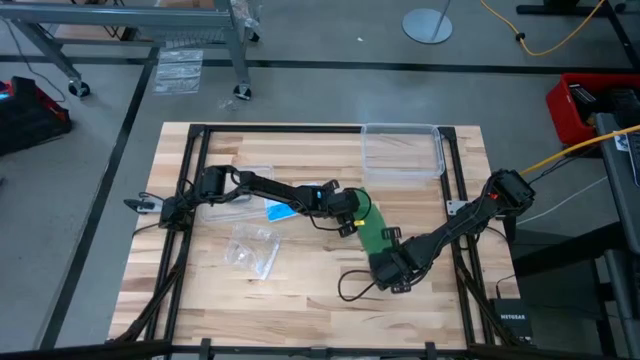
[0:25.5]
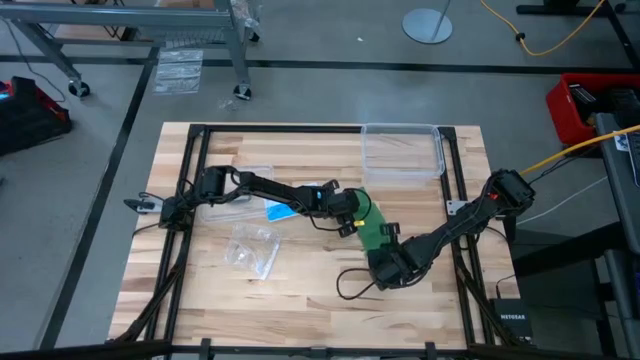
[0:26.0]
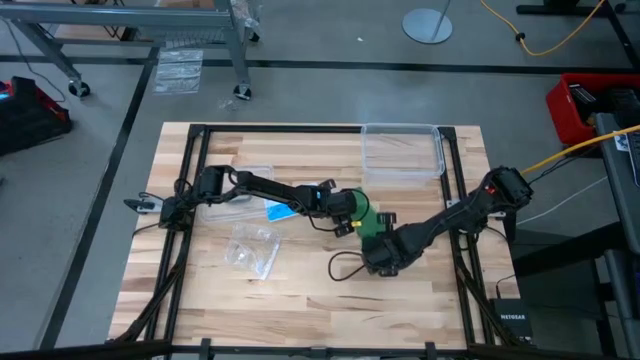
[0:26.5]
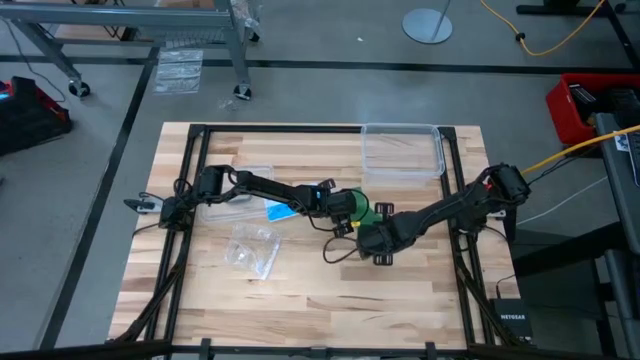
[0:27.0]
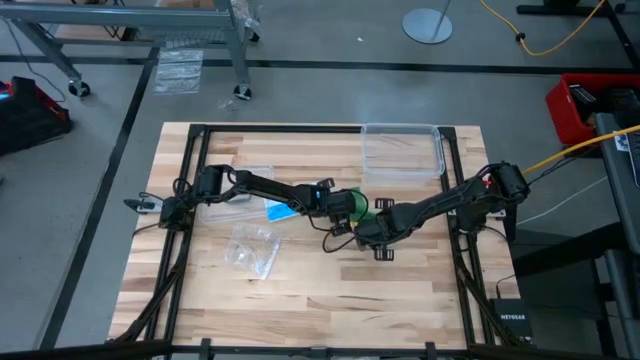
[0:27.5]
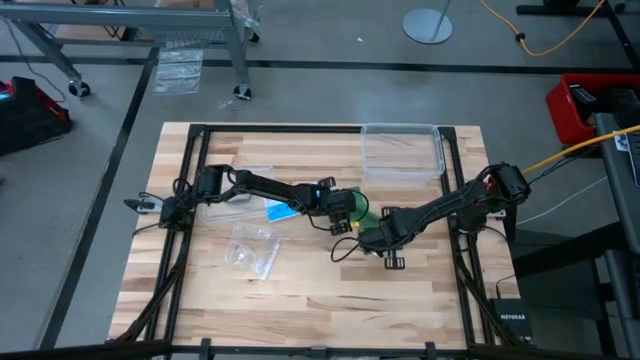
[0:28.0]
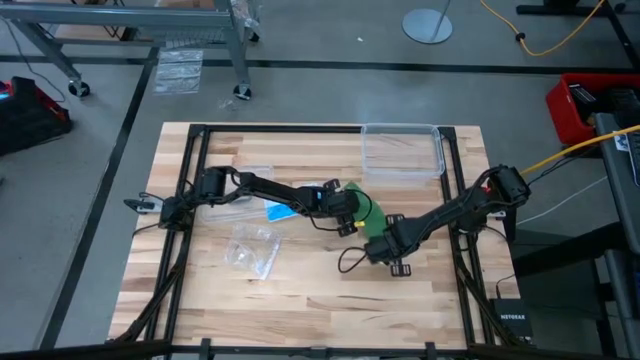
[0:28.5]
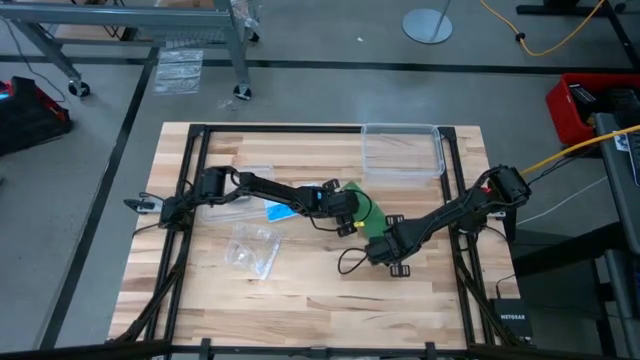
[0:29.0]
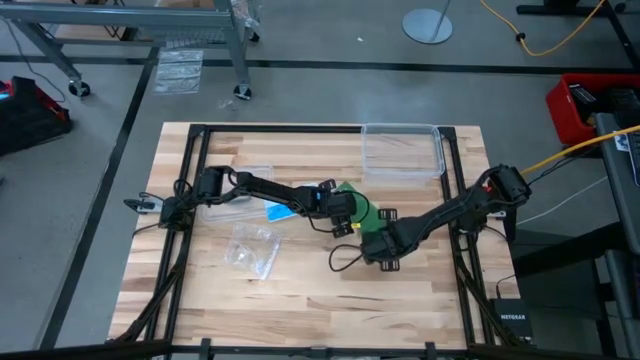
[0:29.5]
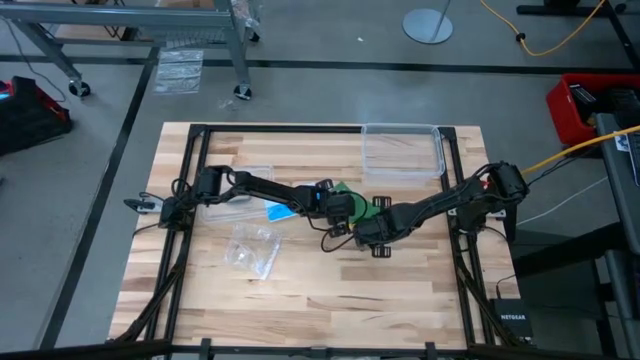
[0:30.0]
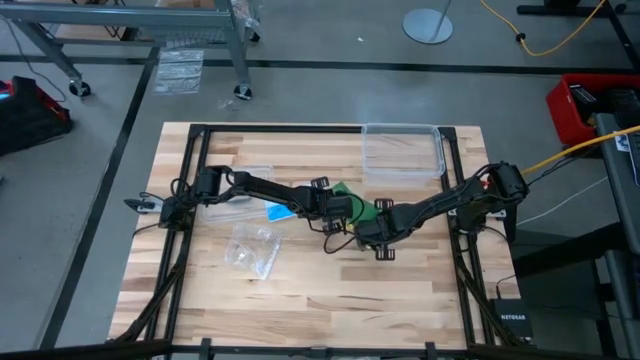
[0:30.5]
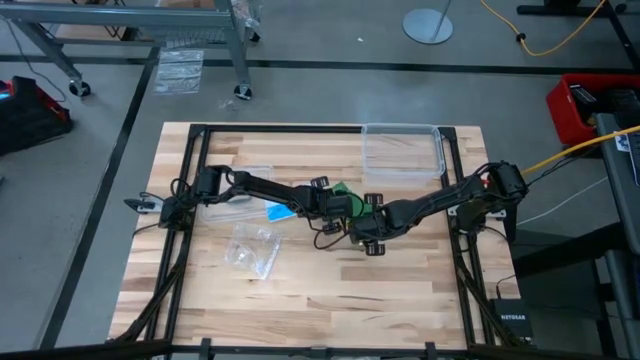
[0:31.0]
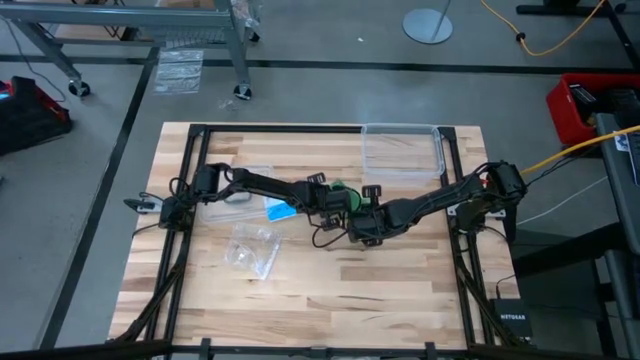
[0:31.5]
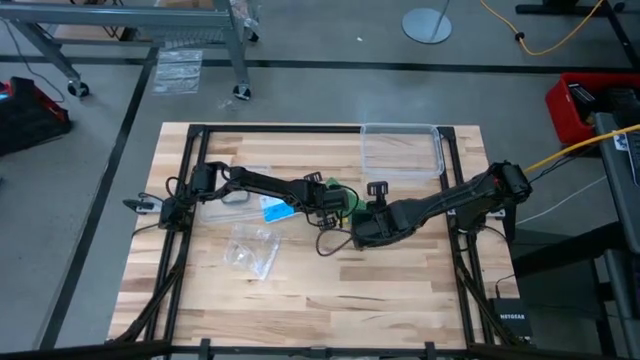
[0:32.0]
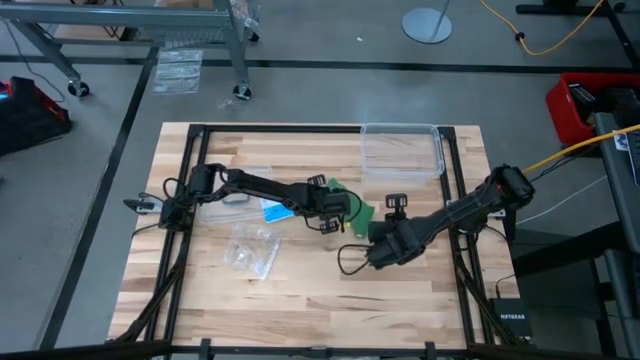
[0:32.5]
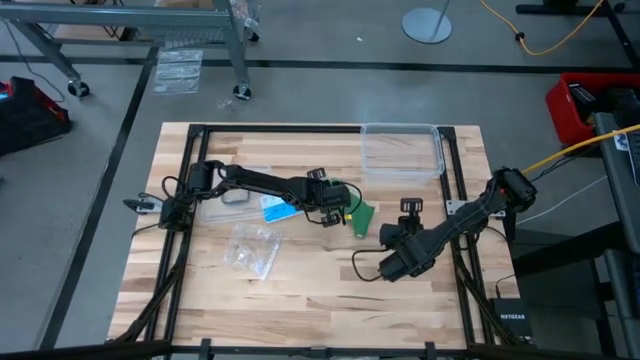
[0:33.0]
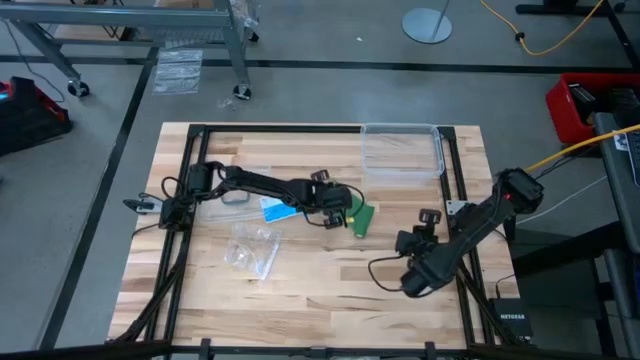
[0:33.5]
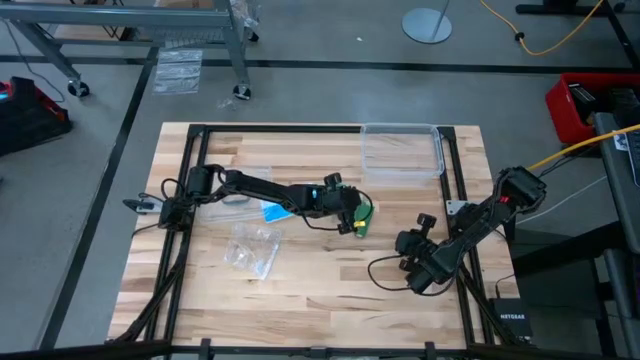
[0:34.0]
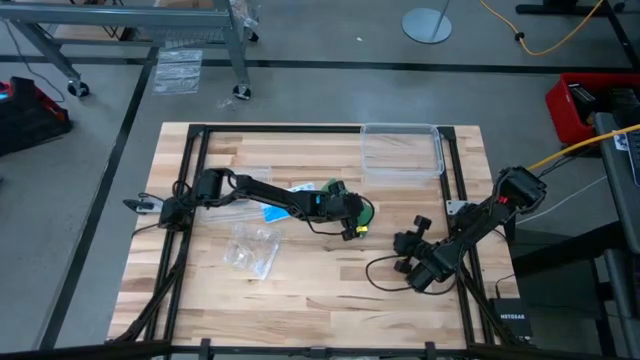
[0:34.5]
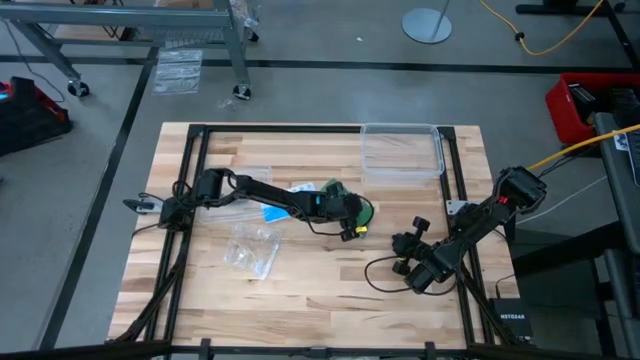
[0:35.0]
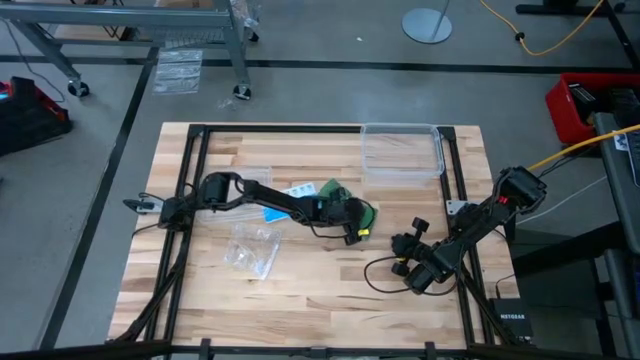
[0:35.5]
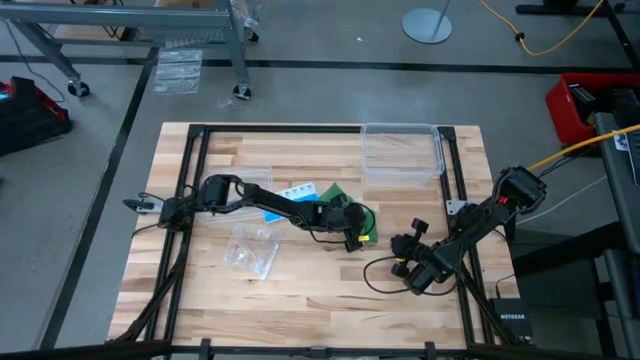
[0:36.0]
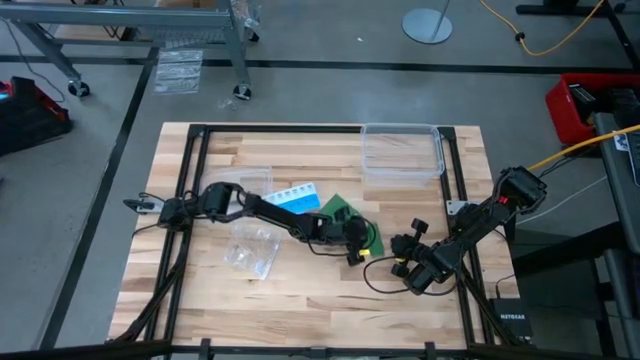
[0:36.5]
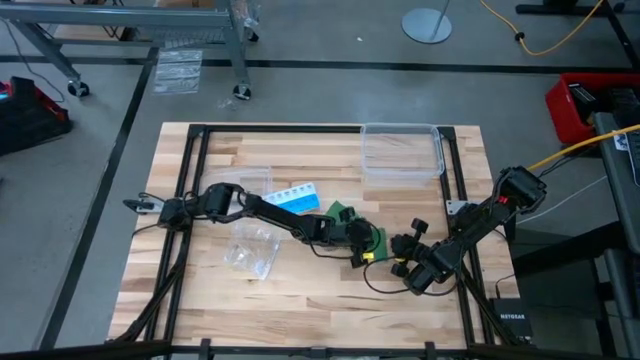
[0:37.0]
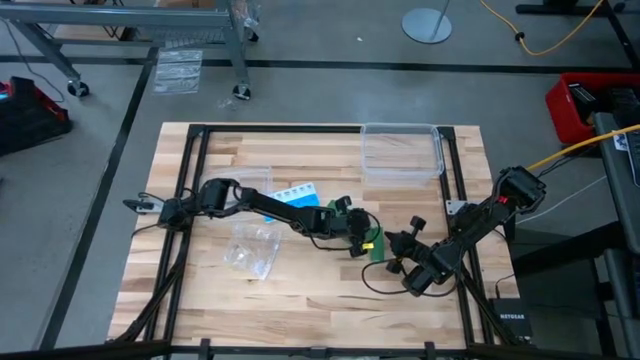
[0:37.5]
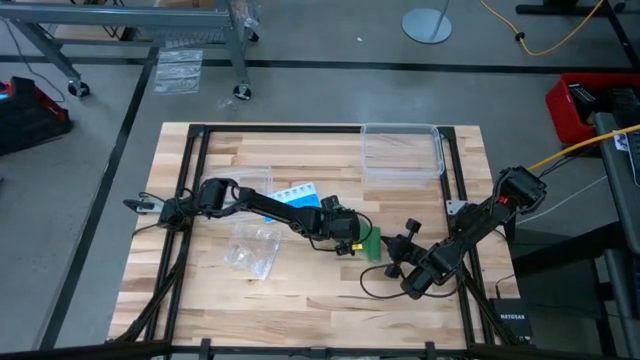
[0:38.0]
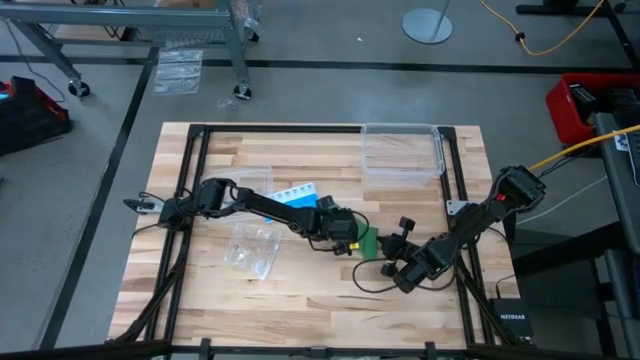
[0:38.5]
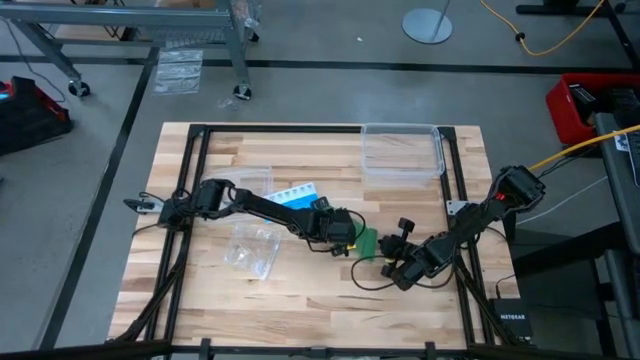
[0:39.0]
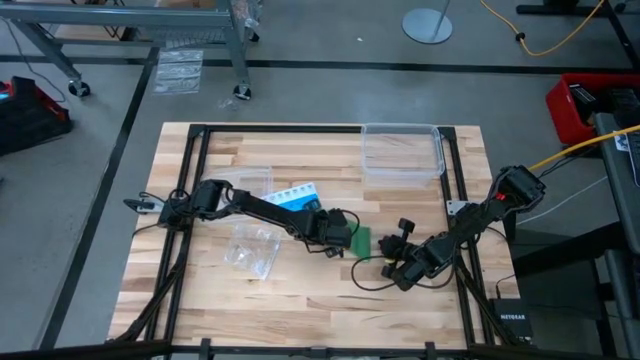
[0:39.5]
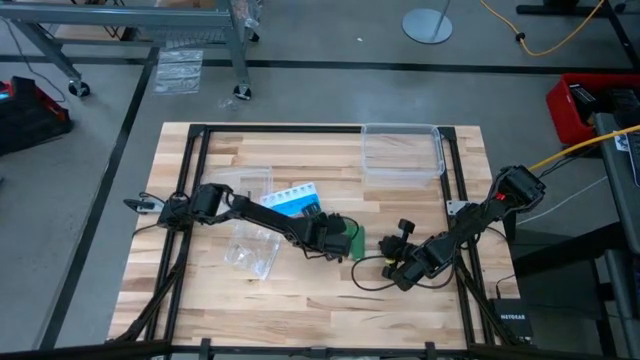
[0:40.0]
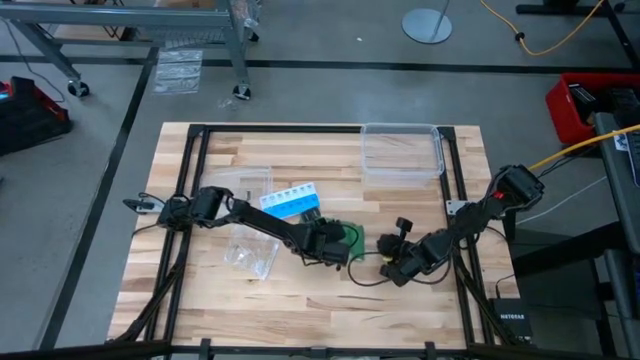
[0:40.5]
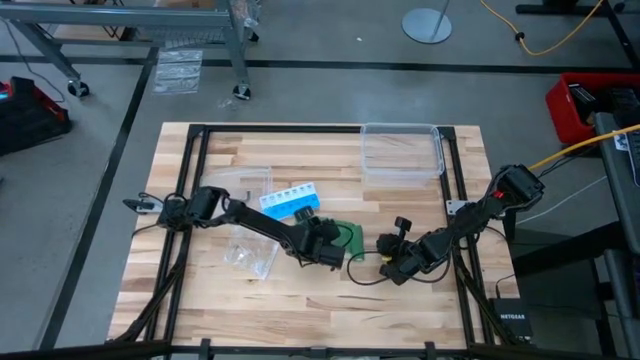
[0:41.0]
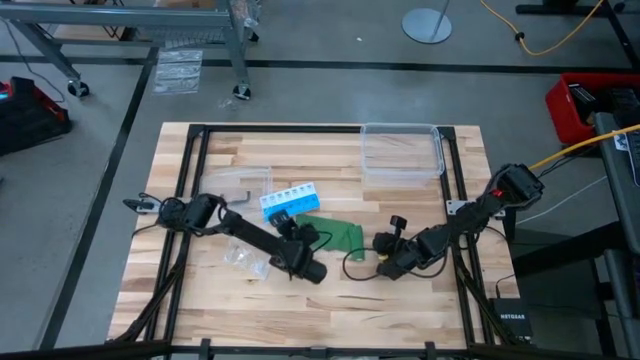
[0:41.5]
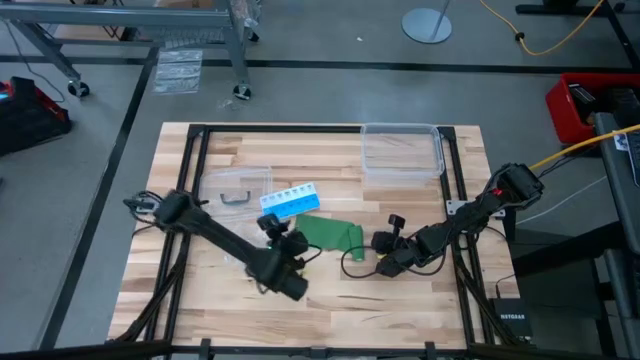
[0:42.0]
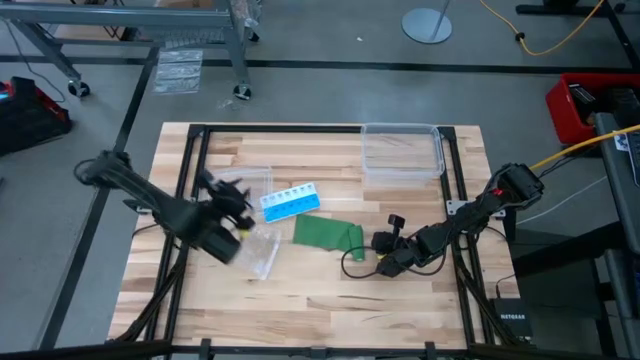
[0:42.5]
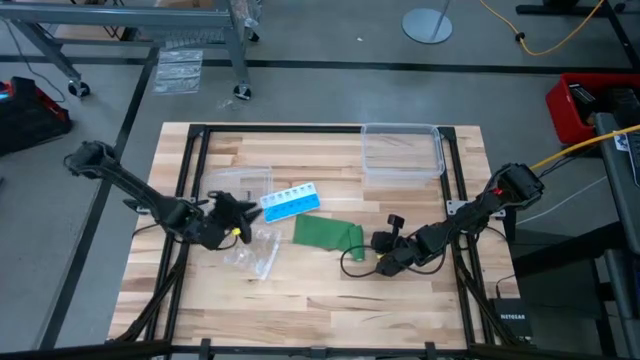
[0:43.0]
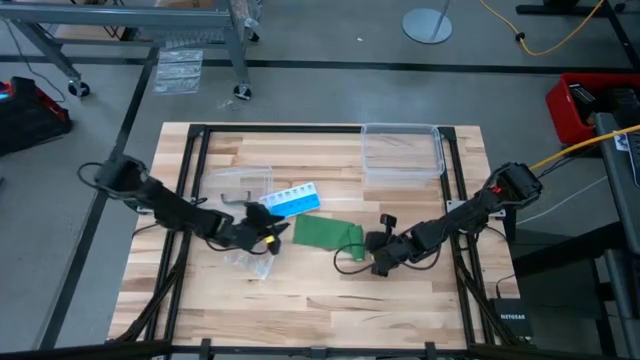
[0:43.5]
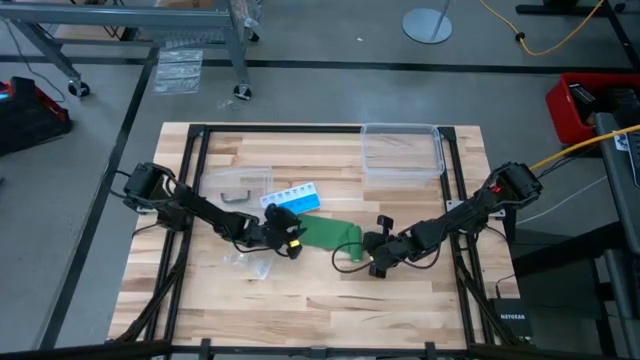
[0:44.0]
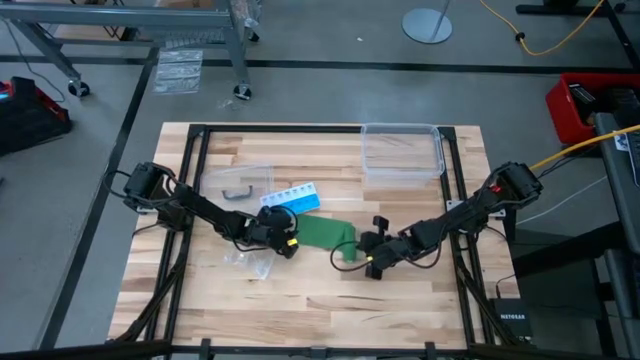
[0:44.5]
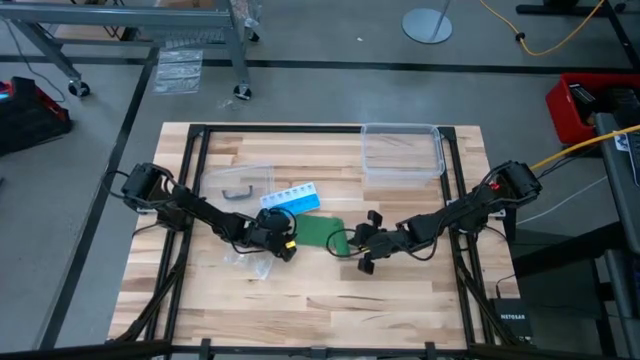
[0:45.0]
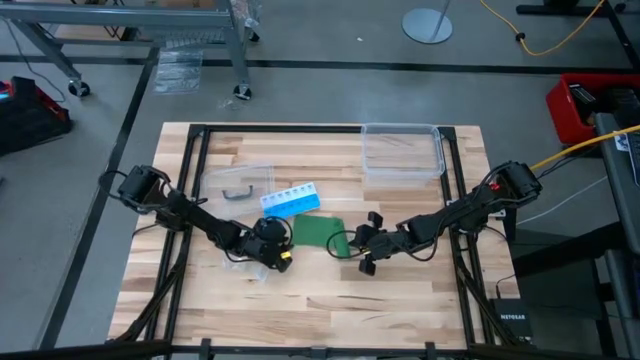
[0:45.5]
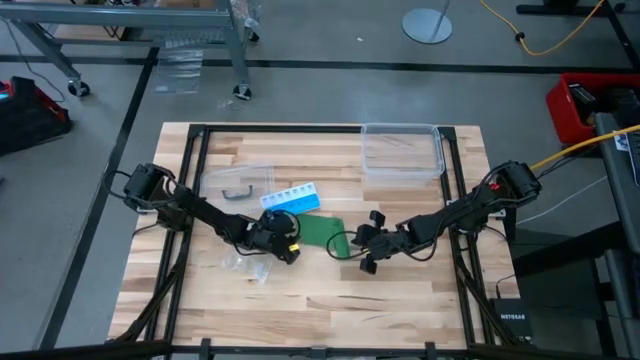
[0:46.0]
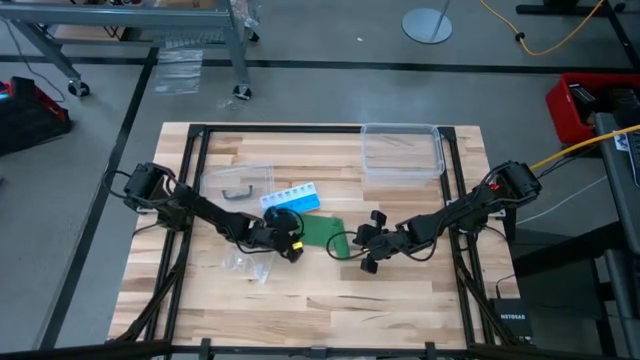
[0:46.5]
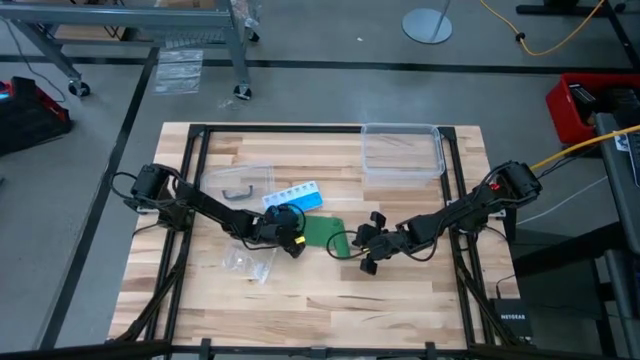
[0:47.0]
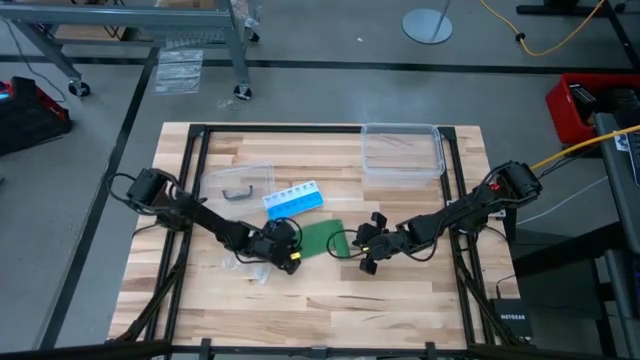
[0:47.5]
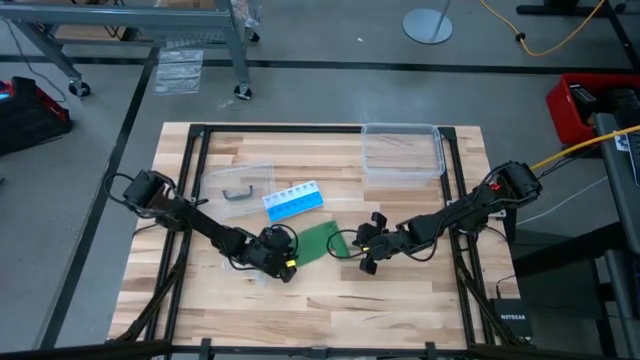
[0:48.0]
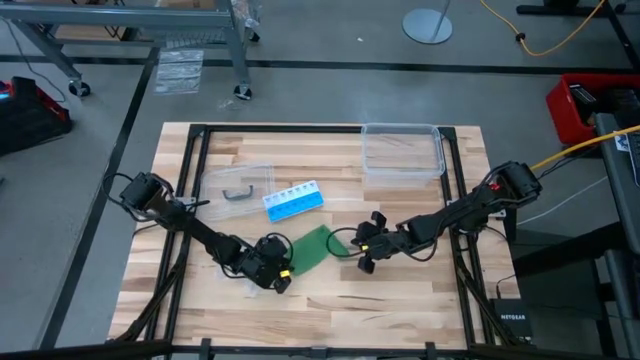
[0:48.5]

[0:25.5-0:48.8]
Task: Roll bandage
Roll the green bandage
